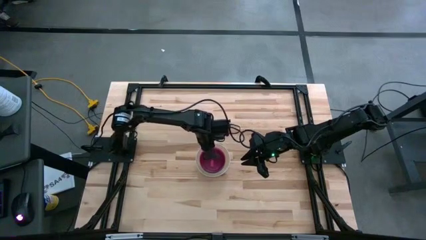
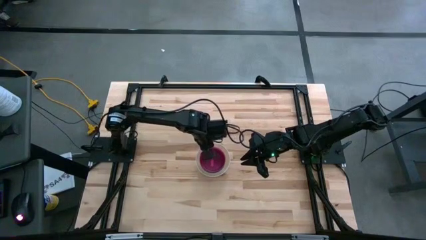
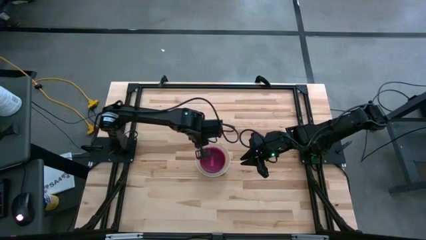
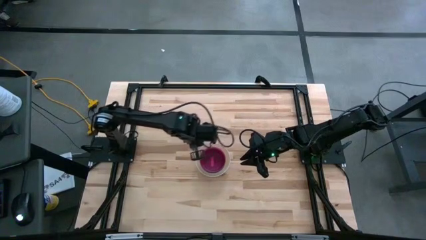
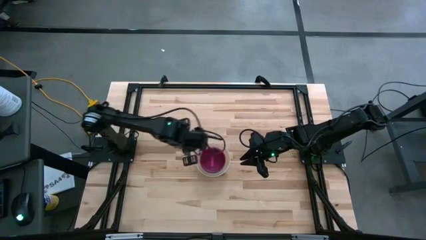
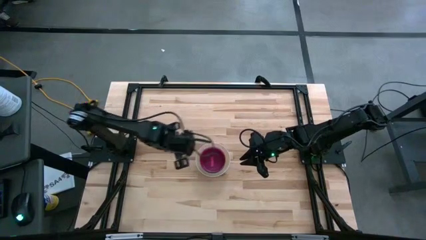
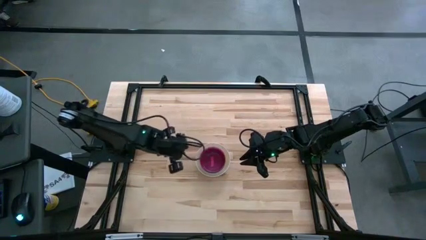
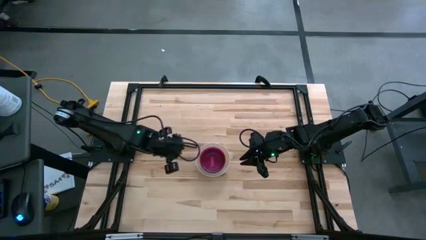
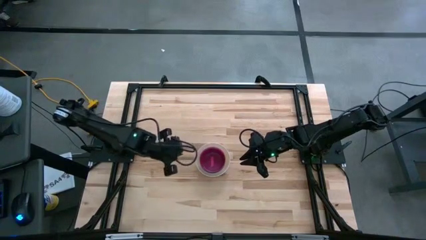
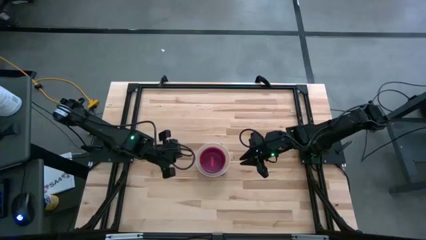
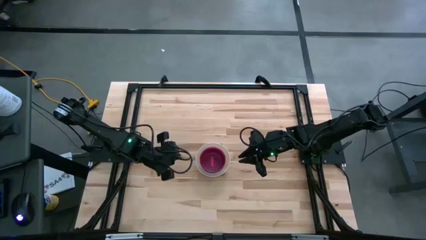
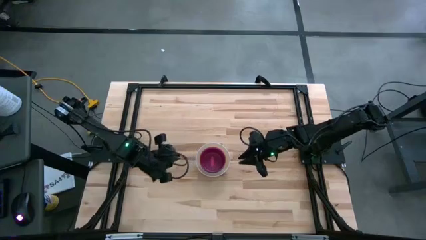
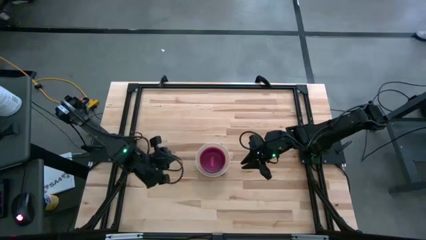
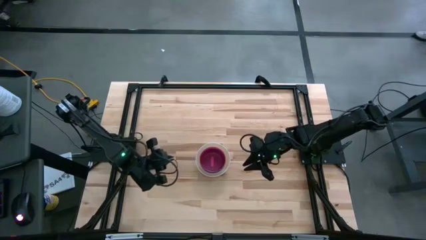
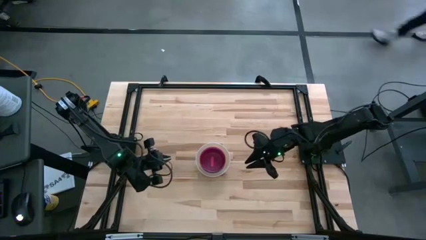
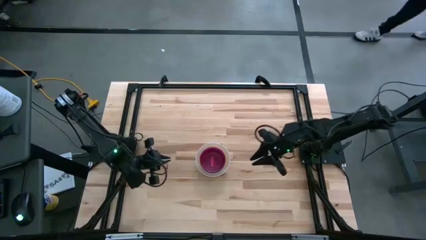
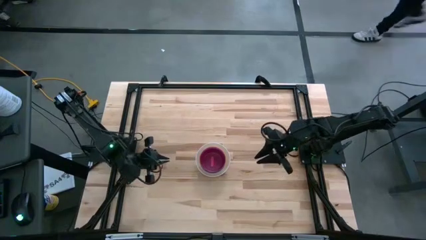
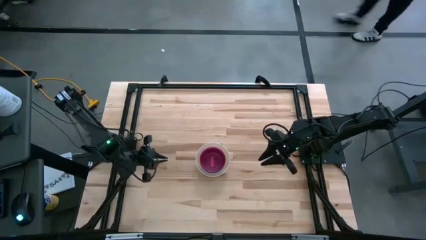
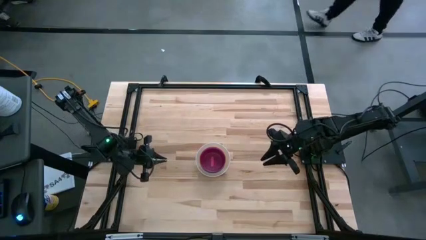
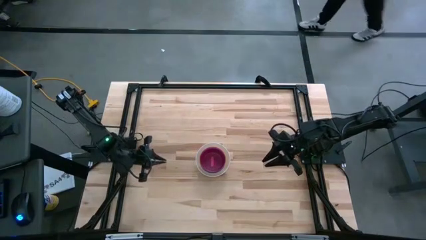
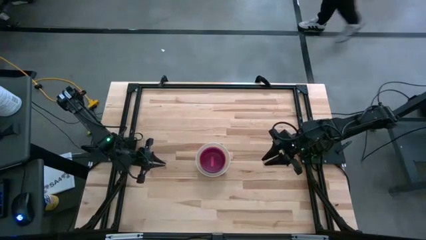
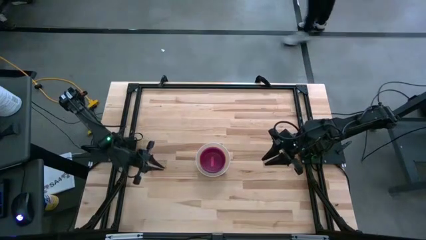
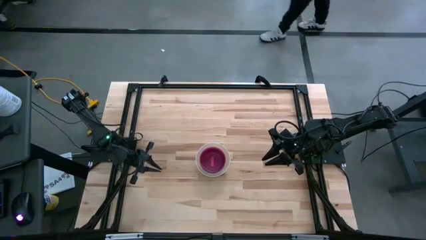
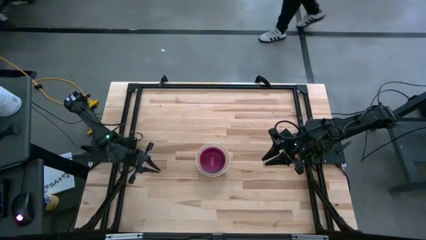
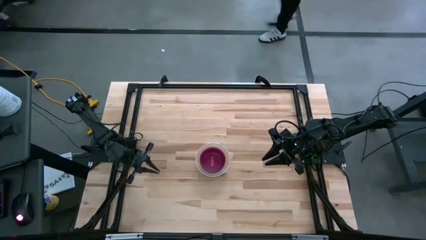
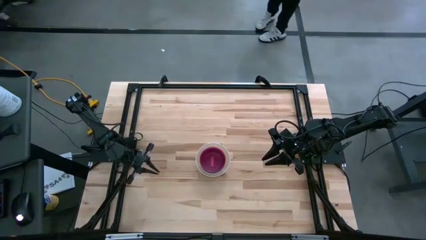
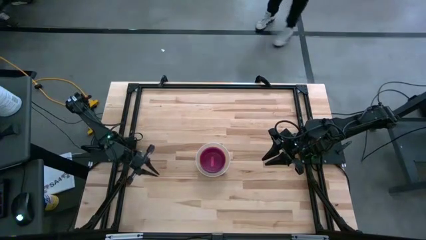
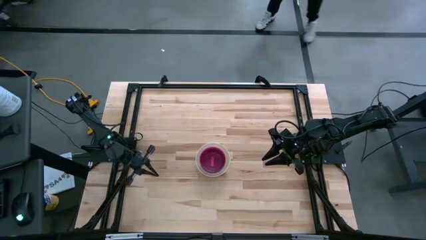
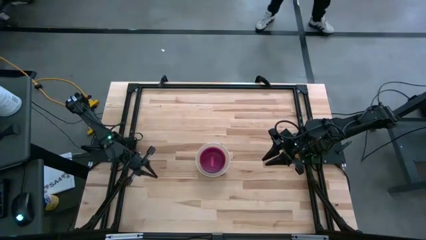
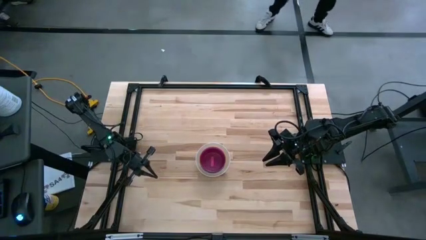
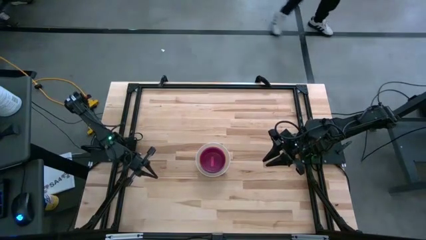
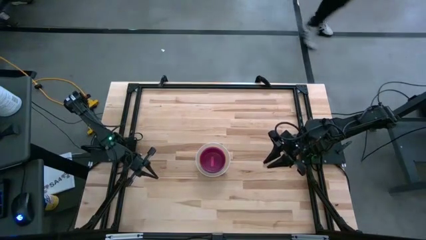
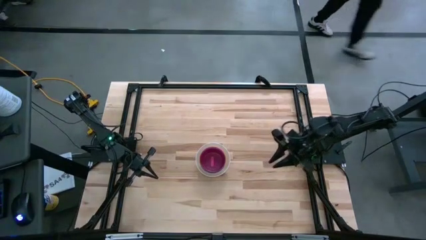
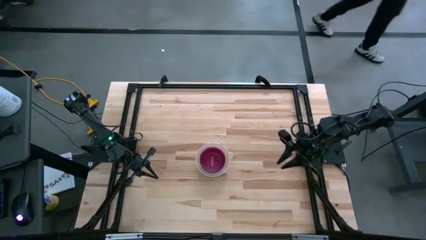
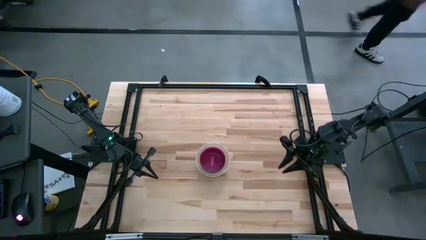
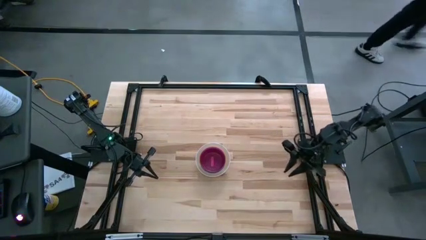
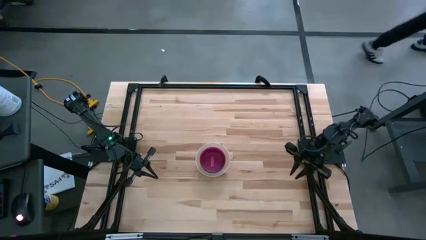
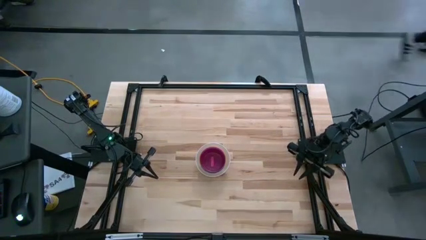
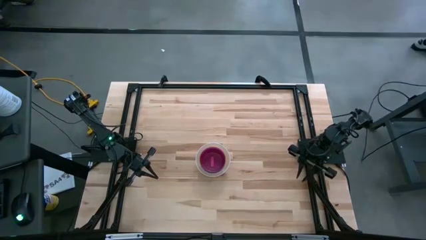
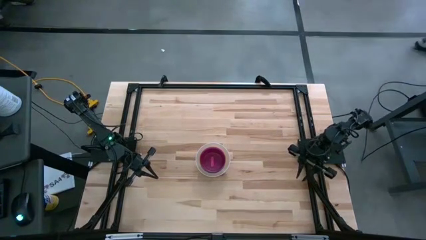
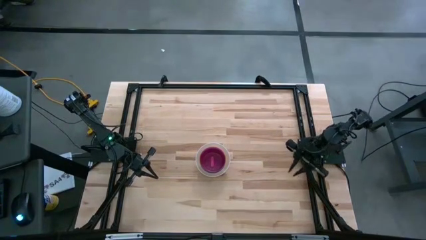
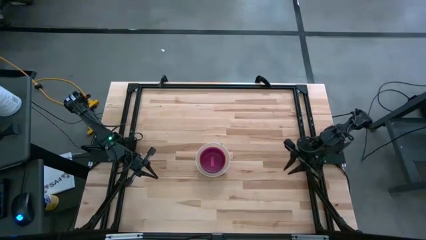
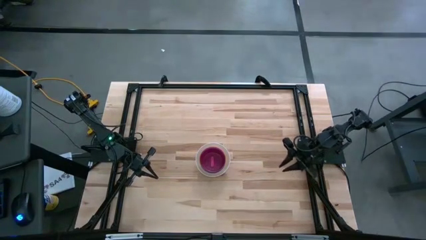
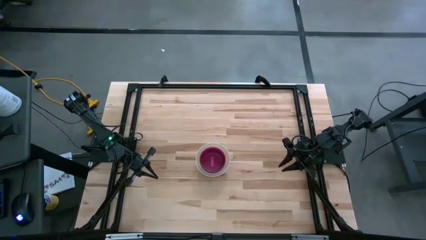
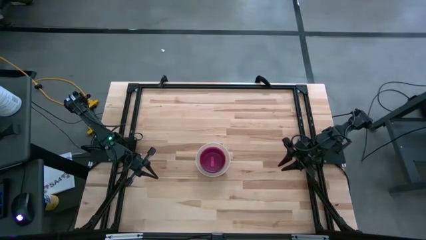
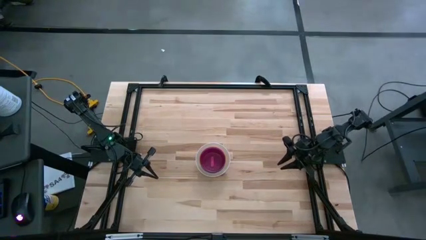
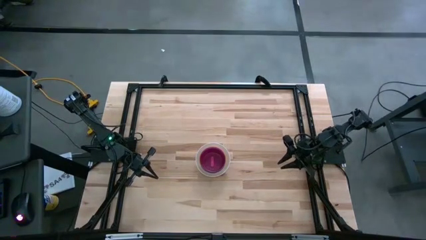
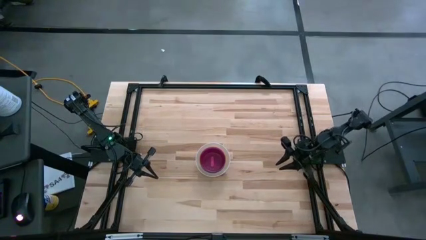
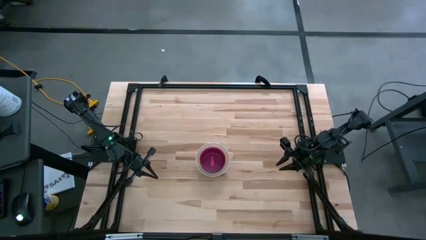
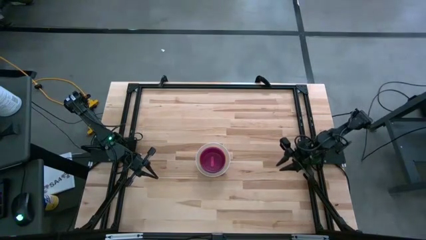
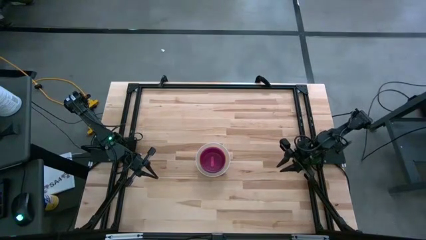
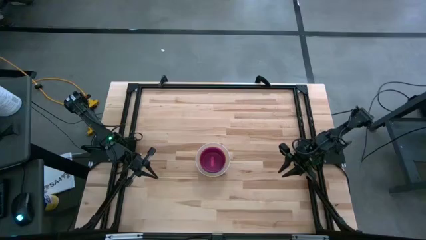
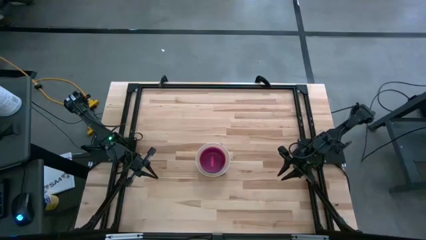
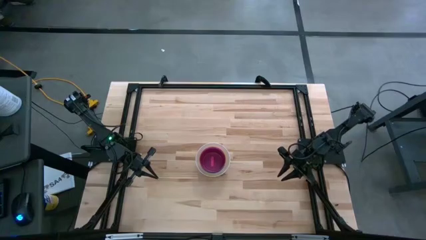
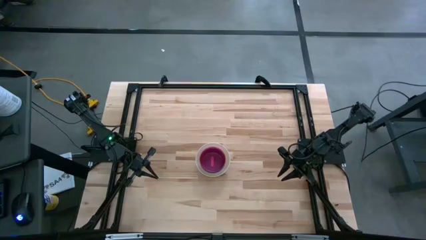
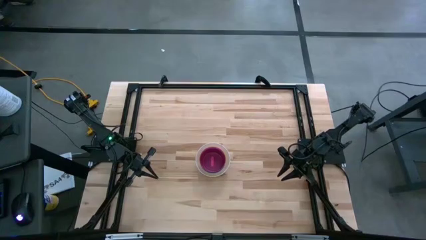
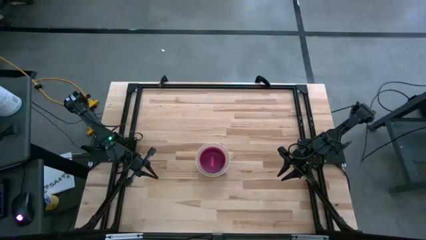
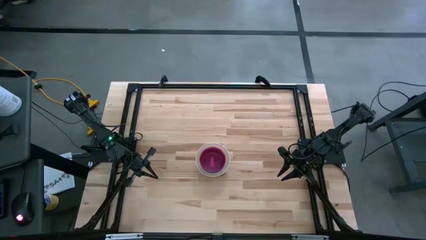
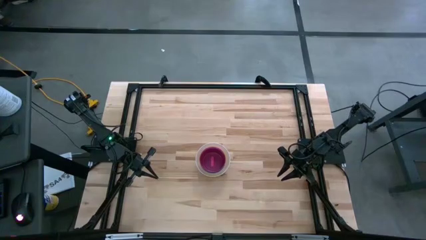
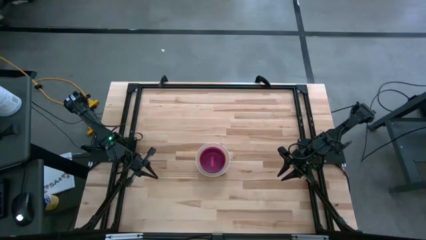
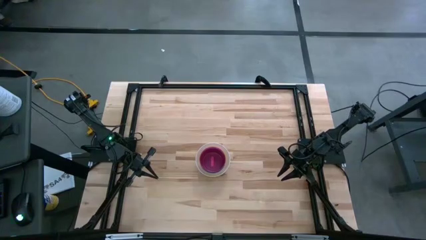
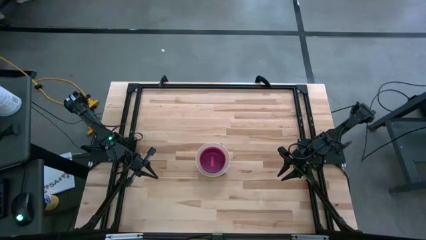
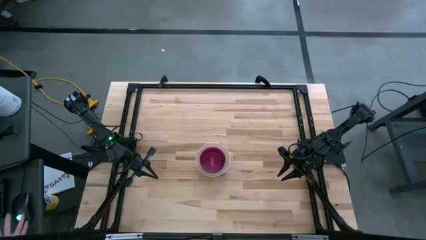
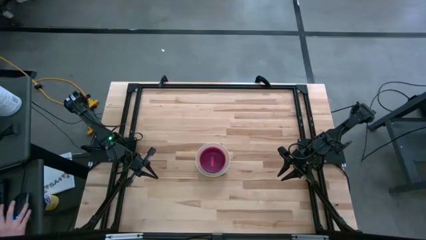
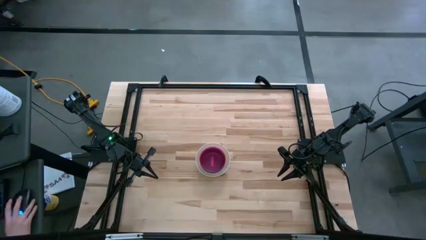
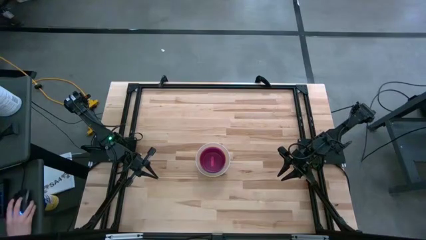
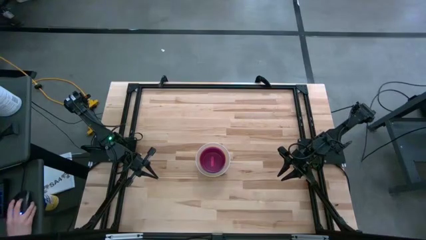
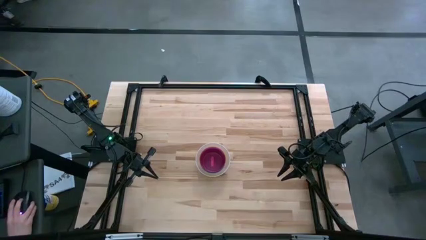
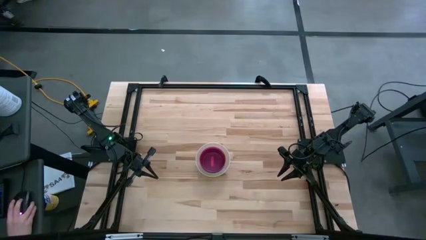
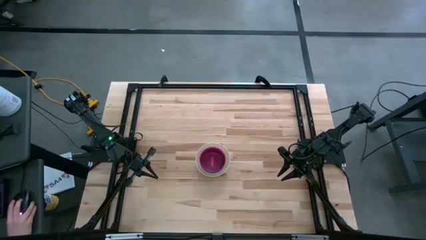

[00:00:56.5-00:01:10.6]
Return to Home Position
